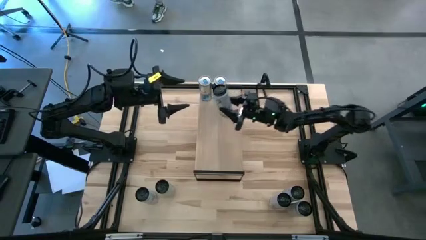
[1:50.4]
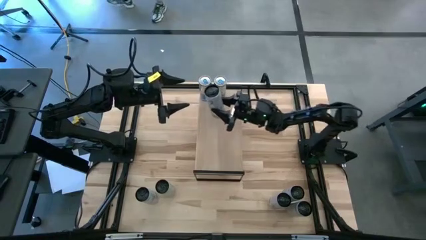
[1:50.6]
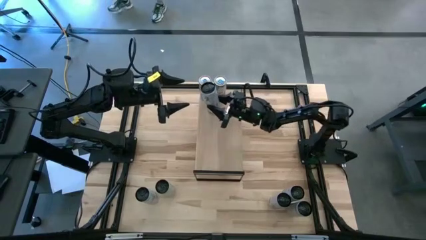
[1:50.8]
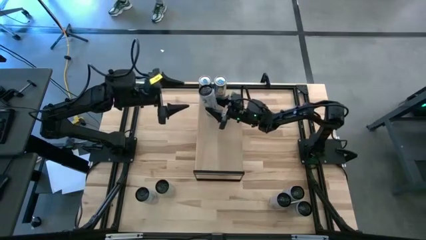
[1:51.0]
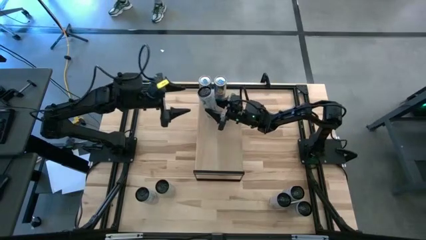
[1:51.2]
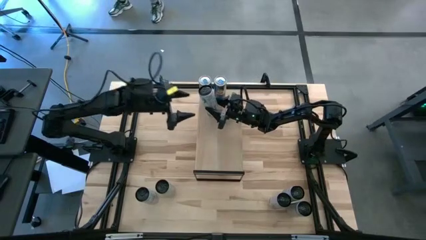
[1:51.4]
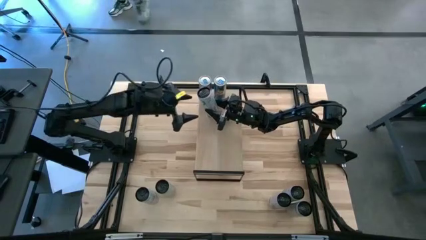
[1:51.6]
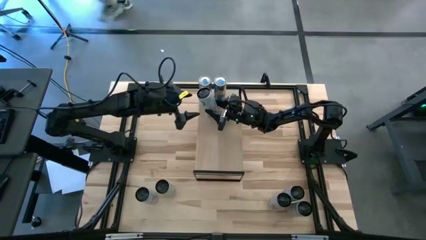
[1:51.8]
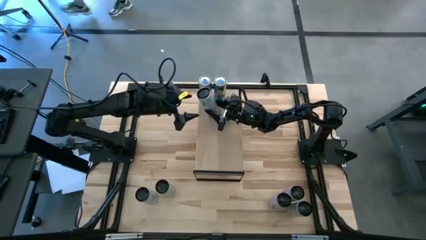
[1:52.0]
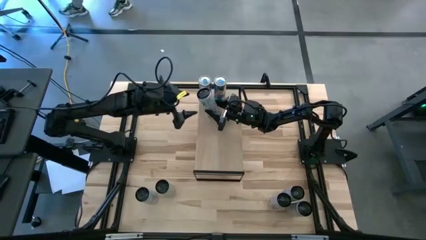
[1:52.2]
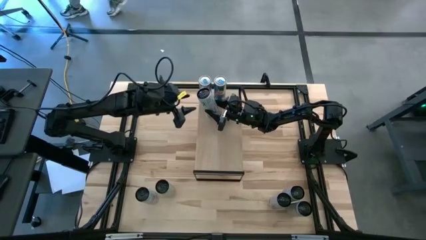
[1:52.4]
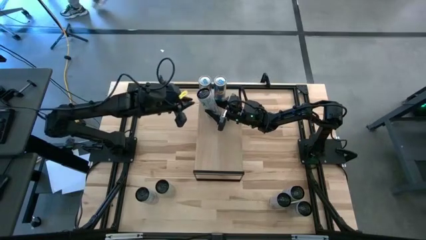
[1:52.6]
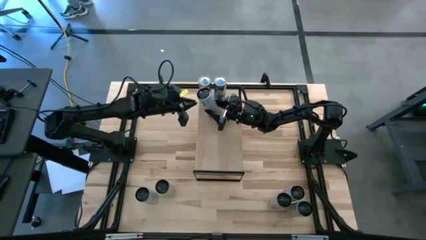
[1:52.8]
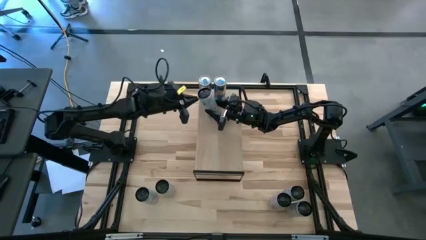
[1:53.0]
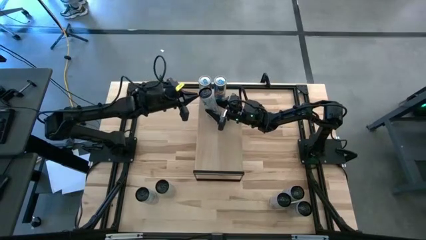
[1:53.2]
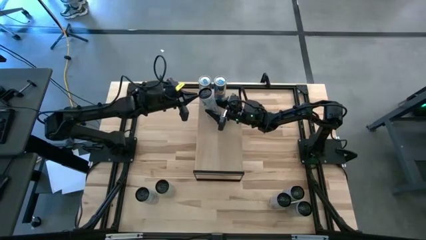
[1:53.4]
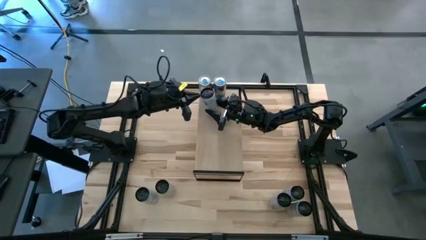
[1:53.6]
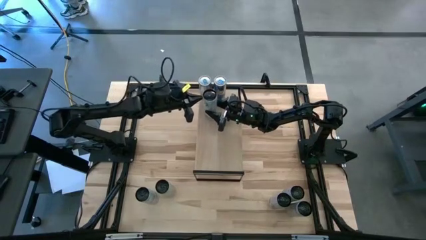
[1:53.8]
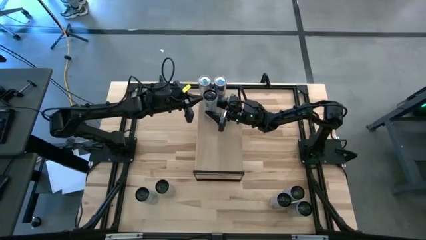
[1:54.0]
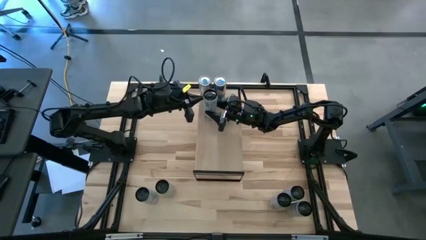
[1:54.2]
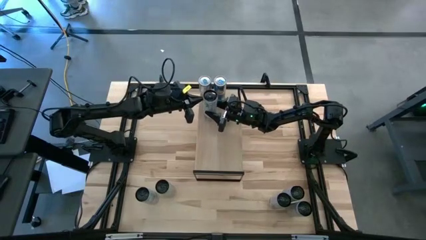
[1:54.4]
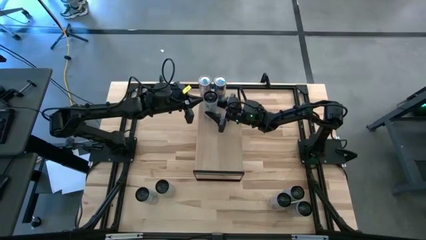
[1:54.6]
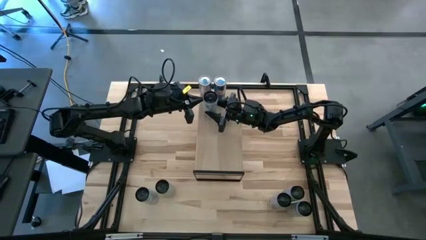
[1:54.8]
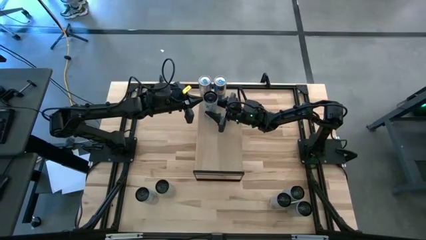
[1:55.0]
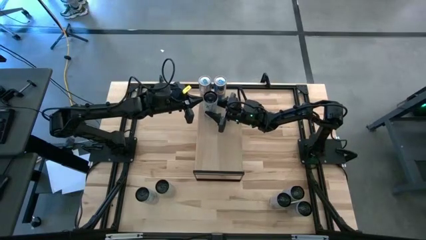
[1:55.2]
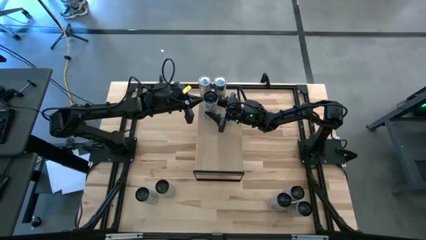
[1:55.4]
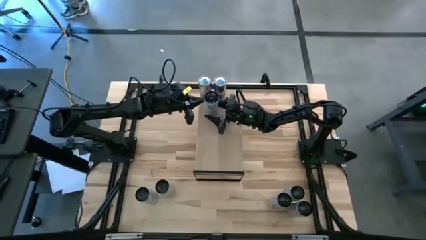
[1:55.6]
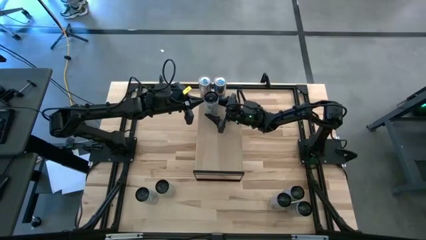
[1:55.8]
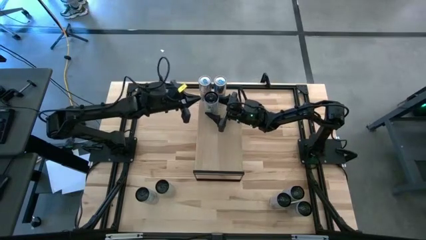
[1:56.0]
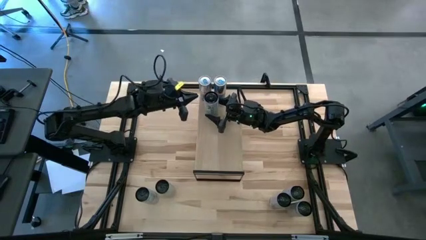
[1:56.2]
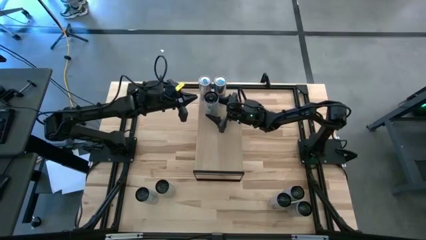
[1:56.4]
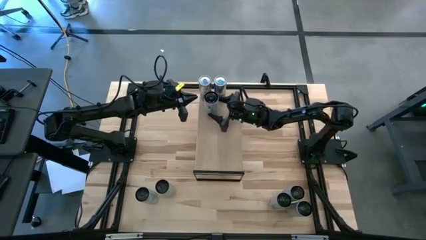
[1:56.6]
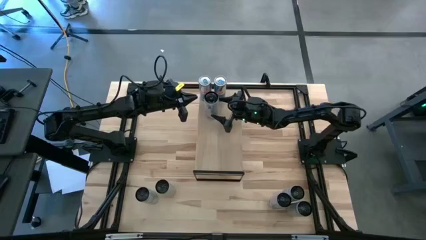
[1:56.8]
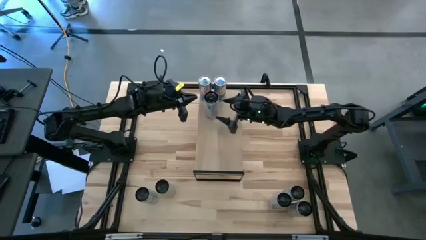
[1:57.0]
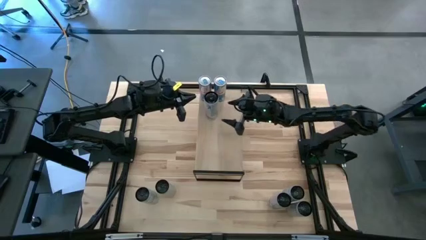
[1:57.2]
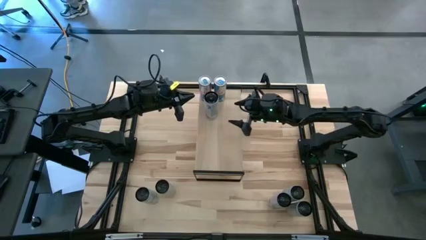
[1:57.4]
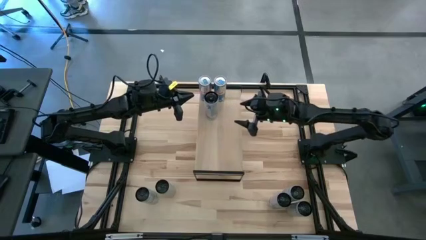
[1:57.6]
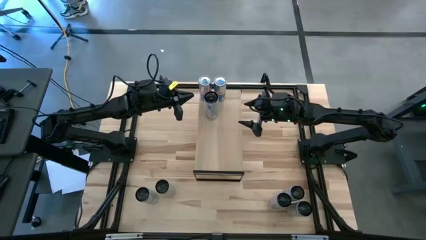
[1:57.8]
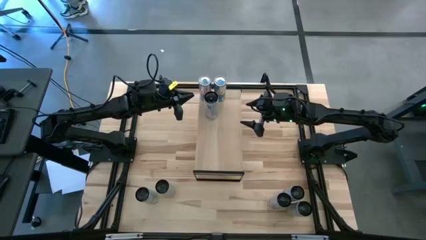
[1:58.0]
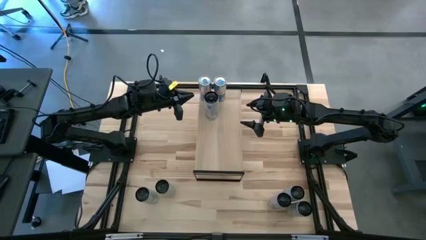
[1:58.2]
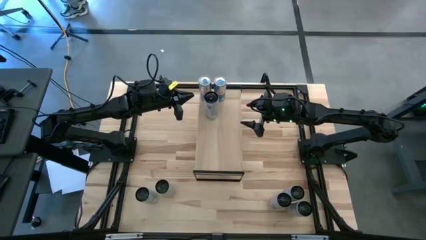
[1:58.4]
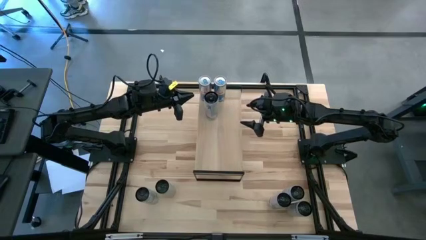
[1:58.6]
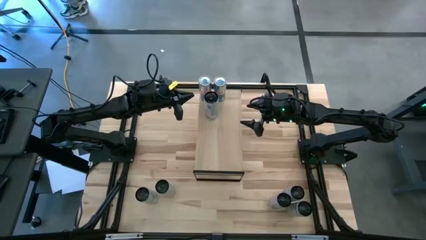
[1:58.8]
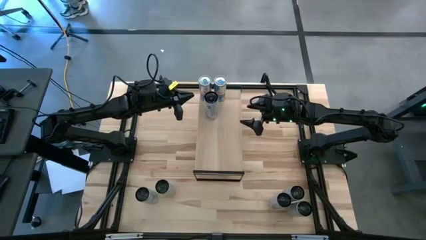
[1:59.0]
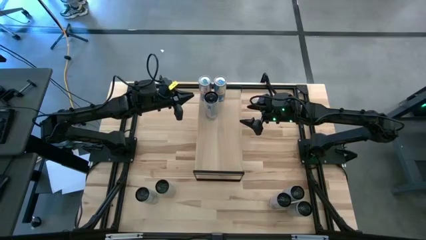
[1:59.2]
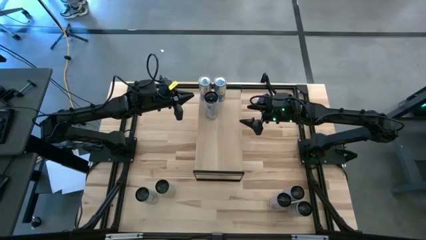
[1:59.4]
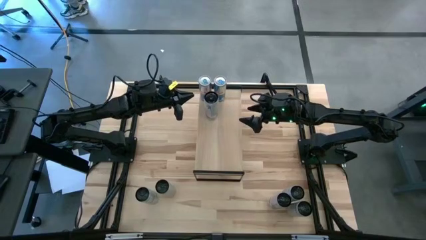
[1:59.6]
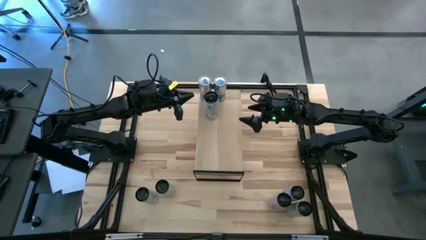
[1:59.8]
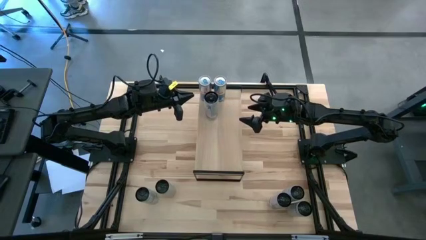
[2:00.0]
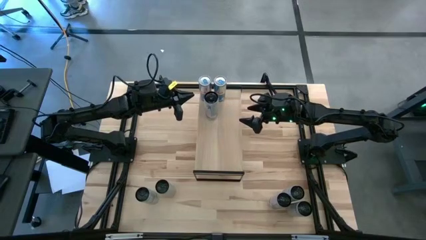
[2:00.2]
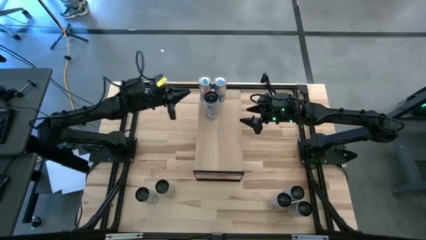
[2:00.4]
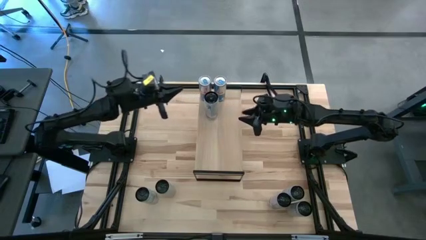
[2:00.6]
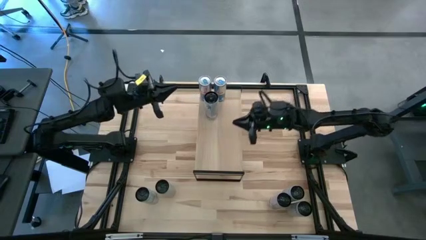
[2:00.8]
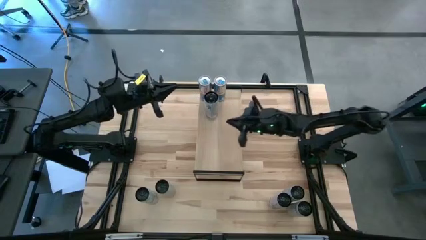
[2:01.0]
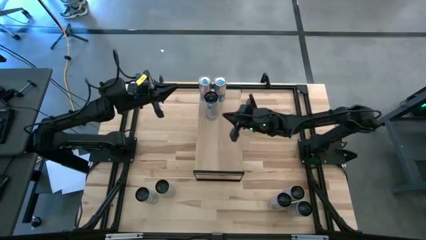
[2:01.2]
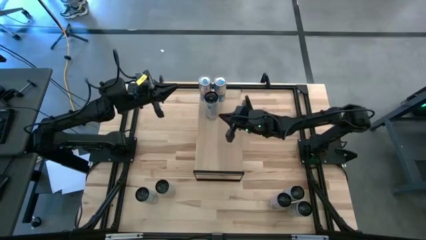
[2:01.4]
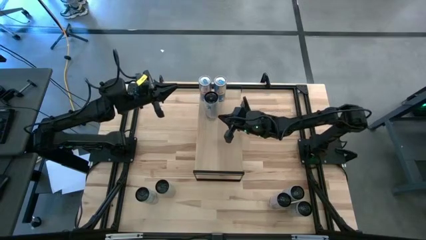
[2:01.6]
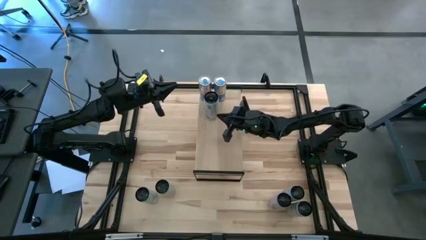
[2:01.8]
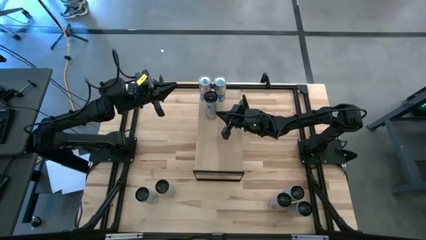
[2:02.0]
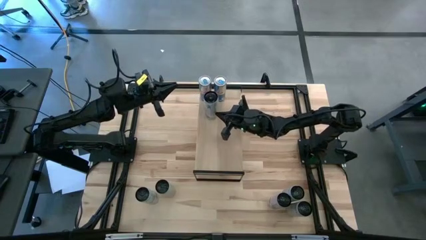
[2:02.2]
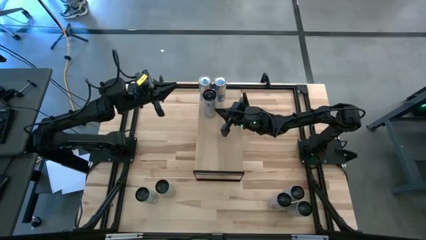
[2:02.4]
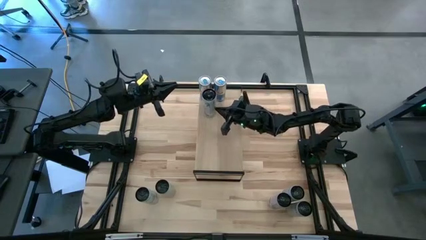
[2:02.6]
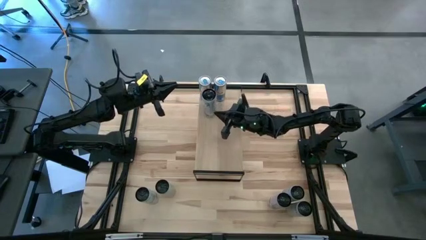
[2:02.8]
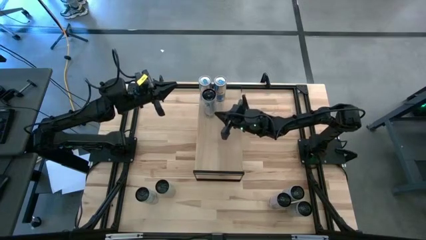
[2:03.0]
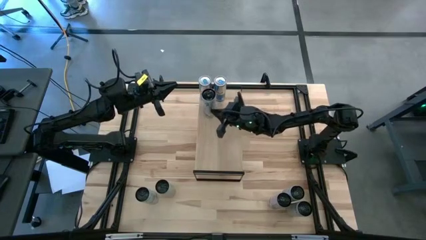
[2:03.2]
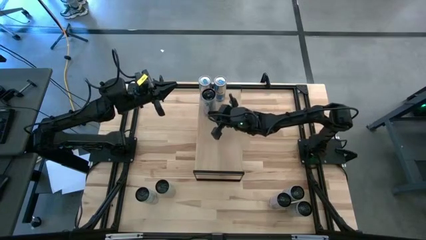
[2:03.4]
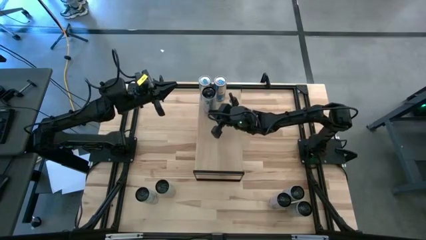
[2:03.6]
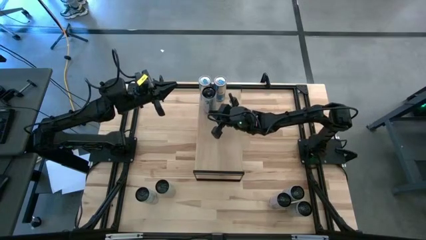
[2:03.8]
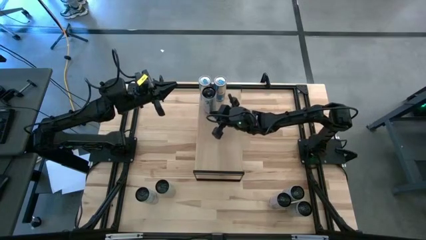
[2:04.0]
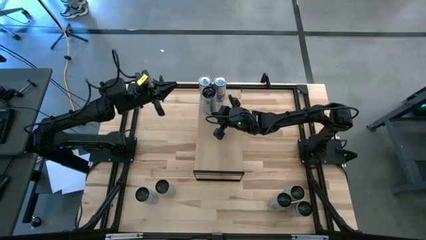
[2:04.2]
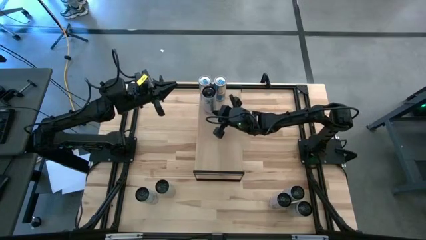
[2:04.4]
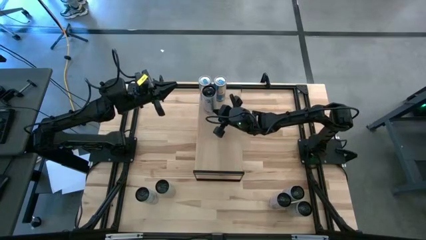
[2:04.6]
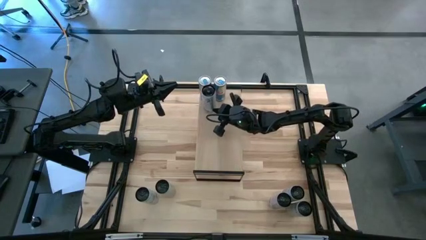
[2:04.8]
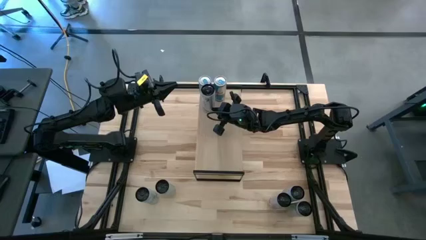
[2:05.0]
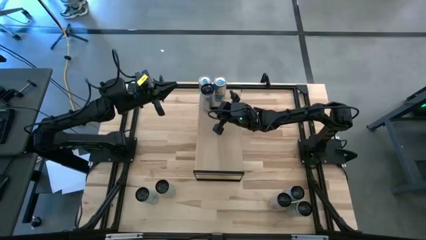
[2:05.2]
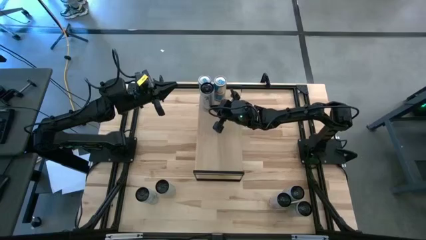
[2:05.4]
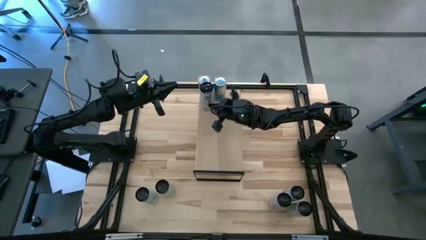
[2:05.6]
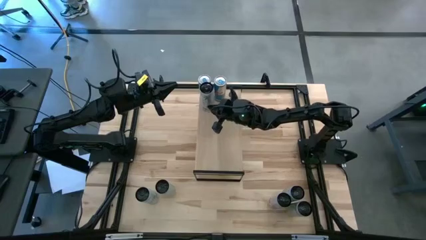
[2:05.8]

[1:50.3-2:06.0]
Task: Place canned beverage on shelf
Put the top white pink soda can on the shelf
